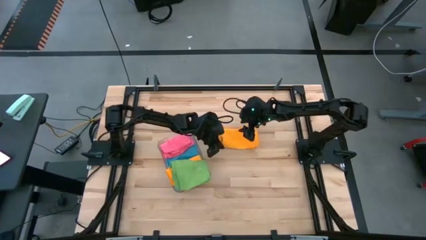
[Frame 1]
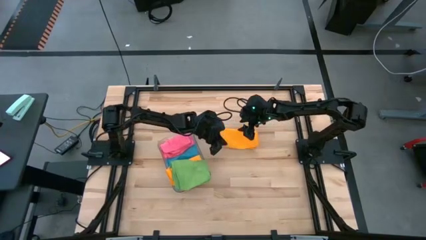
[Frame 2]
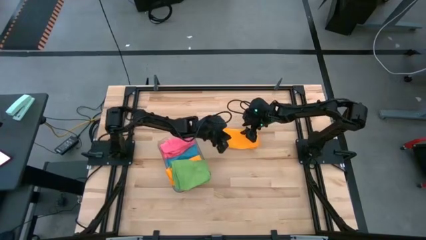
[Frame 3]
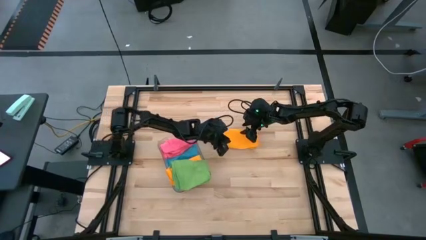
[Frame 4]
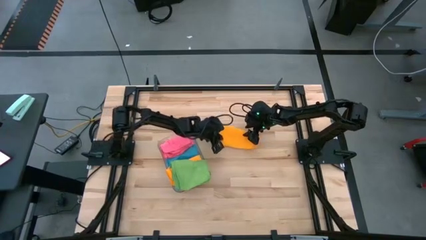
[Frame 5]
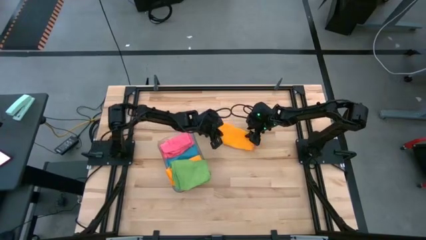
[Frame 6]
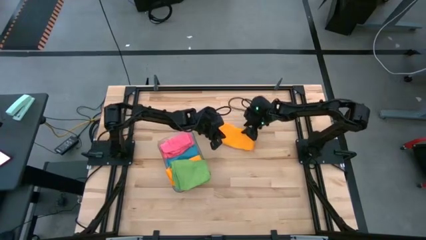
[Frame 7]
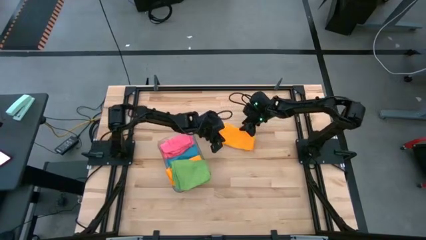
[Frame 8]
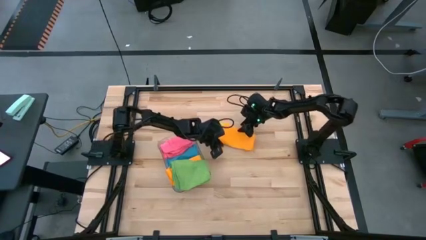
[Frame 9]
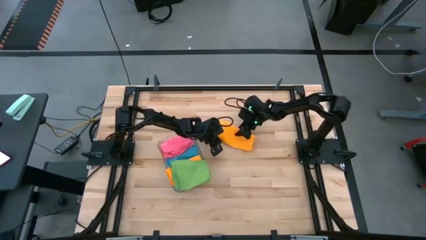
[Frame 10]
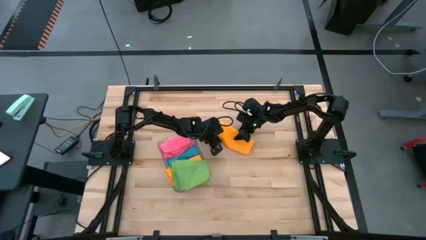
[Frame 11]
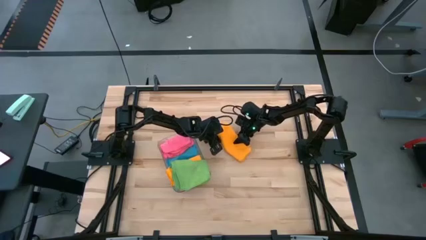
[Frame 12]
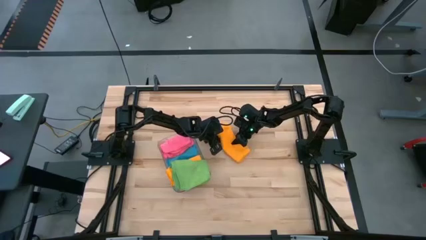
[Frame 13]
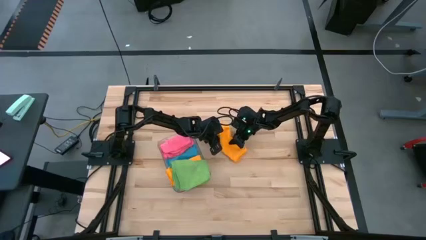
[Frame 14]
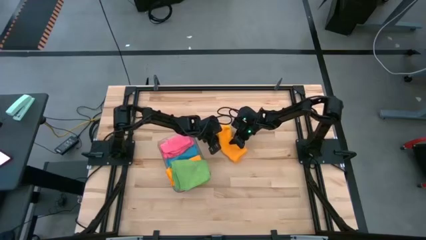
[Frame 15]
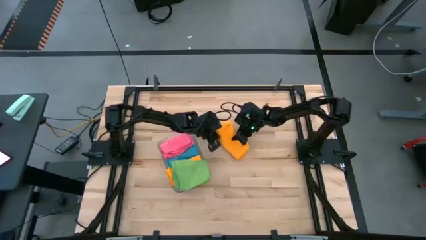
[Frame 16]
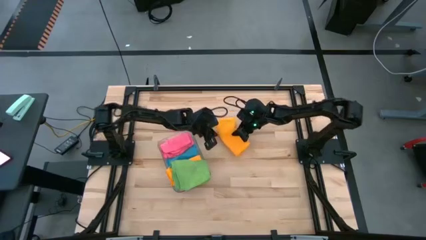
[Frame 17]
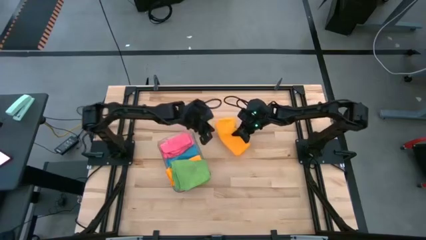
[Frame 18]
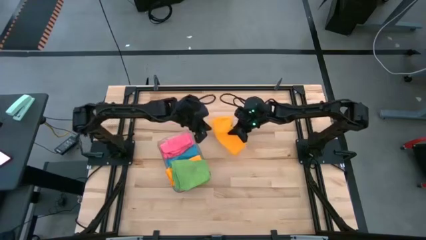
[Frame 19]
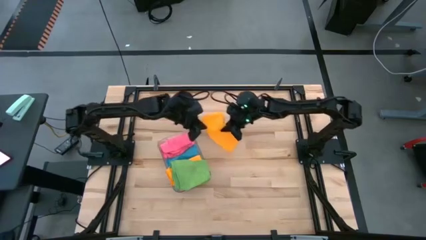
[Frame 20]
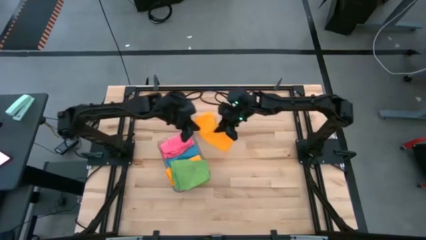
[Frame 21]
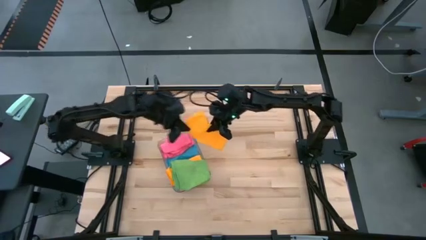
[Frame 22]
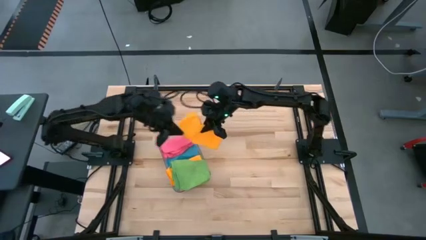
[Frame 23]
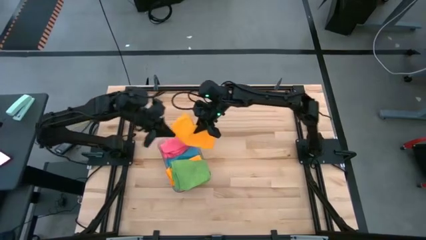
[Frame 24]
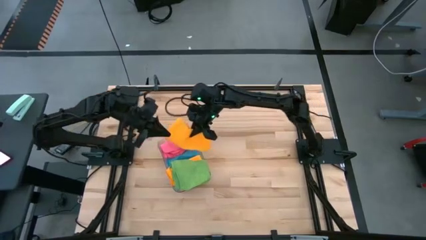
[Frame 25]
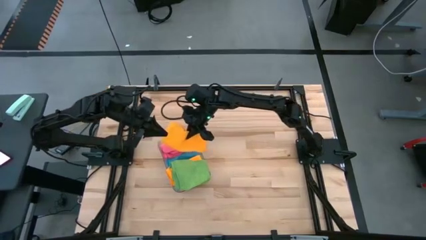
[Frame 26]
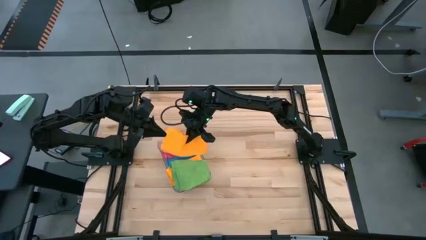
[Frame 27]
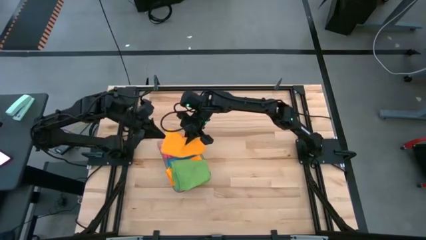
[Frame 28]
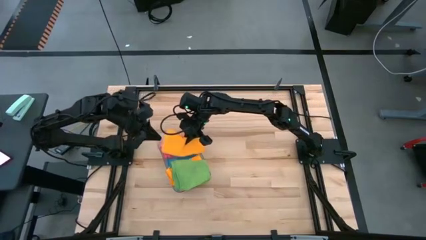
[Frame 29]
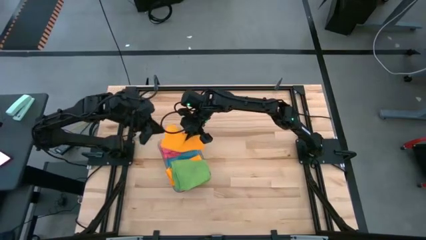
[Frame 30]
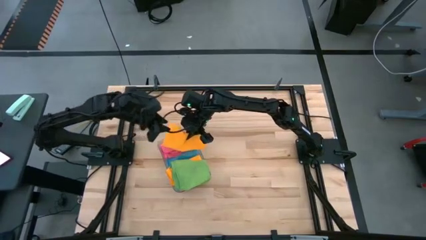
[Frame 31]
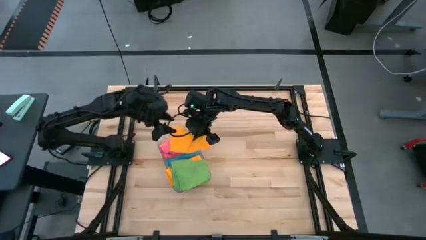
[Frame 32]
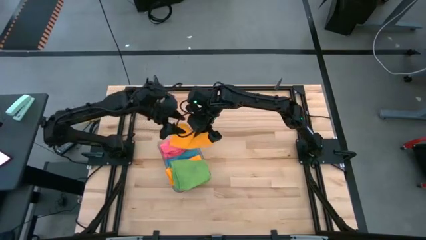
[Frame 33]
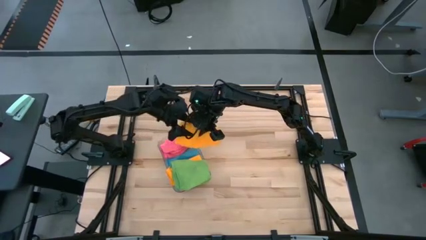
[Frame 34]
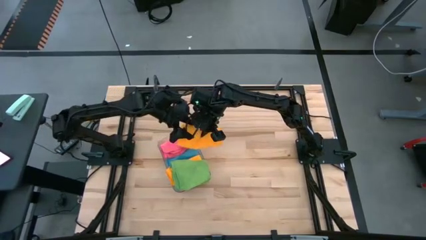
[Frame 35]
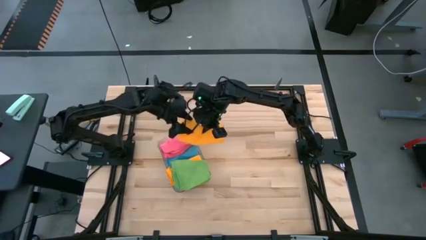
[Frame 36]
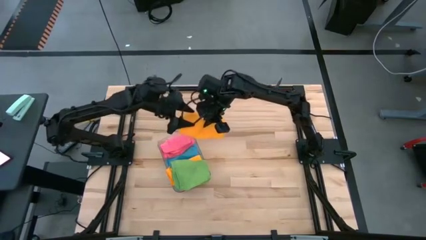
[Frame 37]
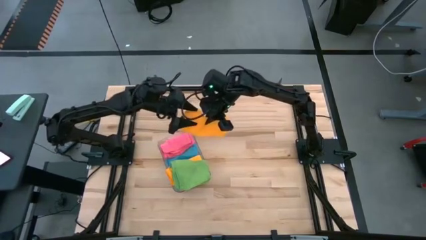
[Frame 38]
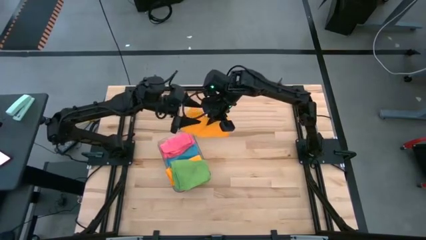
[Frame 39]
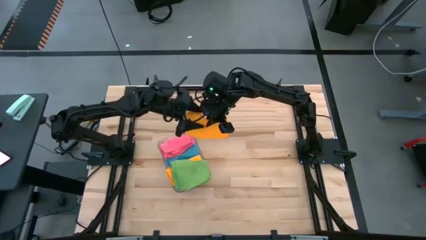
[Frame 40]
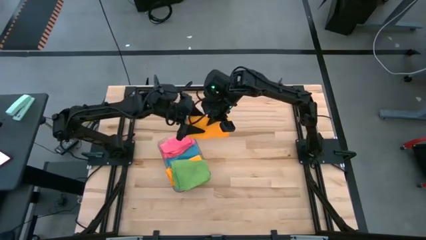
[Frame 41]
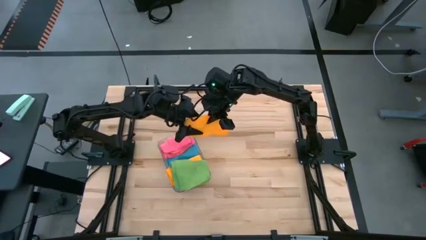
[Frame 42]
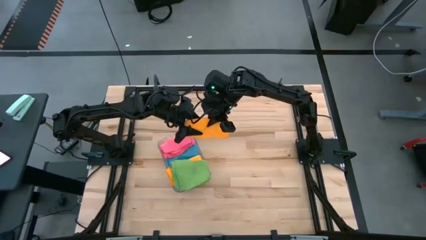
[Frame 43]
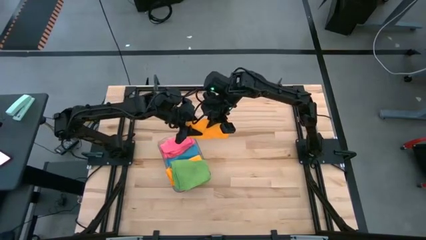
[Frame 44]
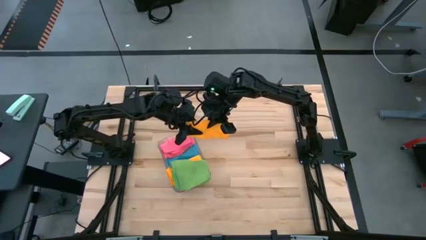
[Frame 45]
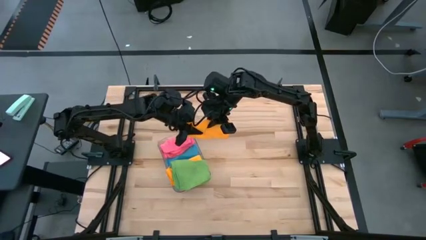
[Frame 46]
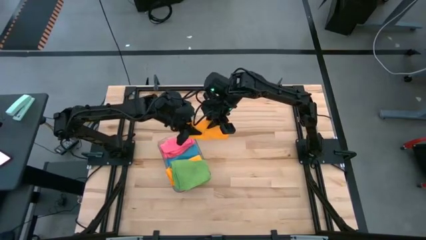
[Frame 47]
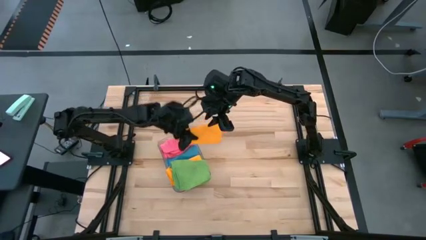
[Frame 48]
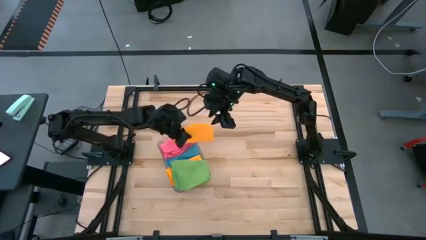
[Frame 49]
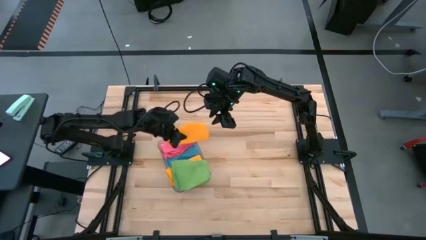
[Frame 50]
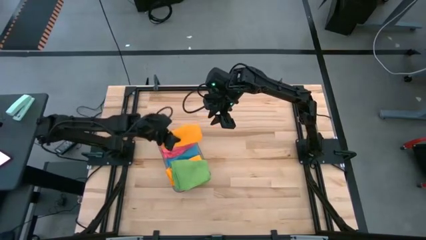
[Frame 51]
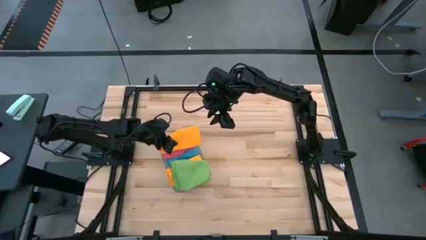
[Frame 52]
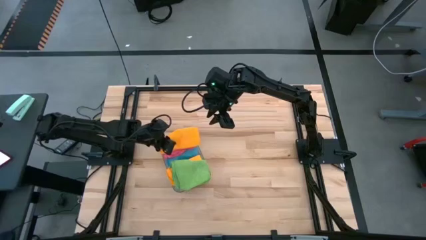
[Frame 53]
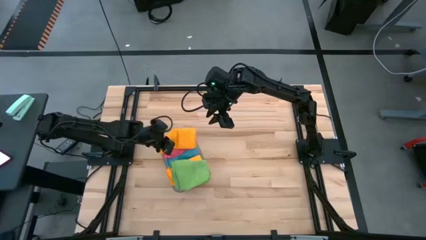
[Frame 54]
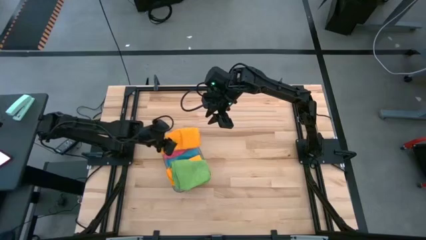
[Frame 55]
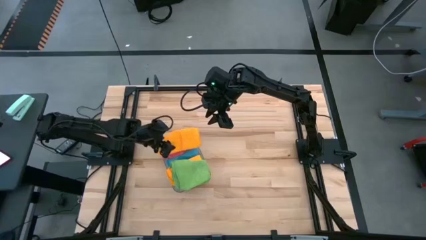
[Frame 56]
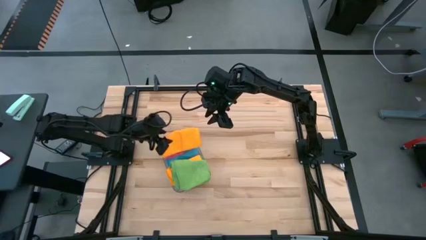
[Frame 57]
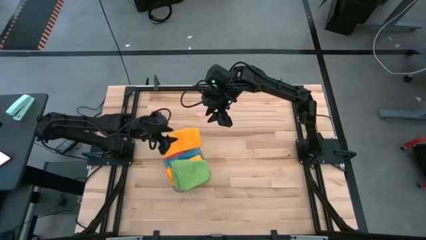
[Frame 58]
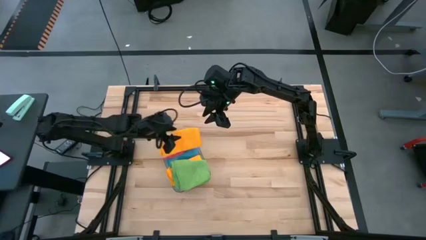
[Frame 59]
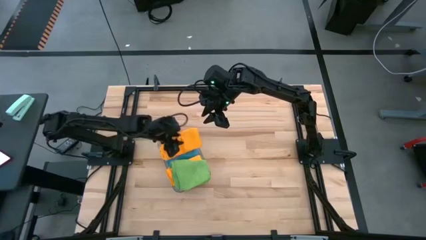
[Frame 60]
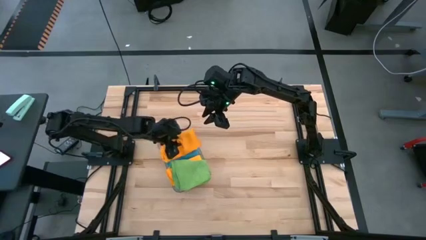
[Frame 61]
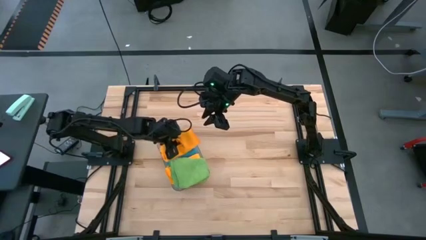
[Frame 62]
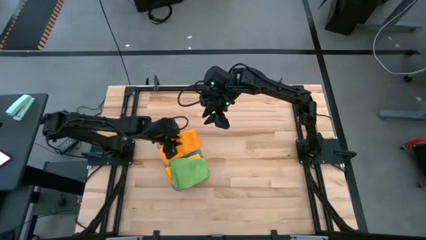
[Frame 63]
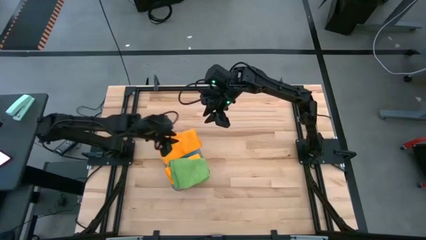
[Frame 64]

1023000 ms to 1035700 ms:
Task: Fold microfiber towels
Put the yellow towel into the transparent bin

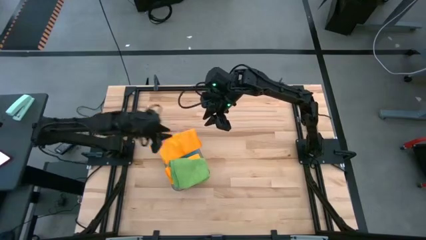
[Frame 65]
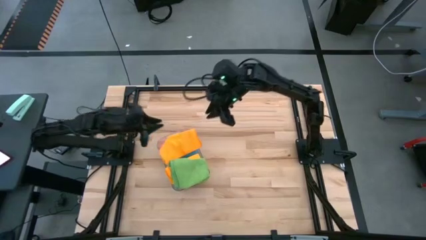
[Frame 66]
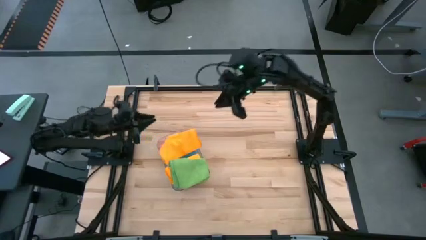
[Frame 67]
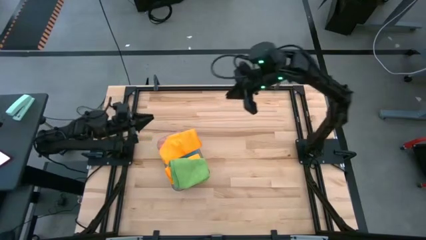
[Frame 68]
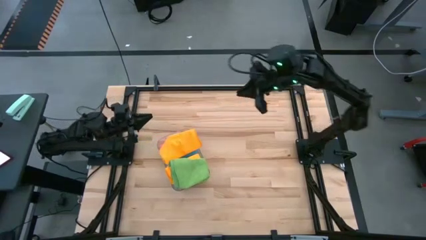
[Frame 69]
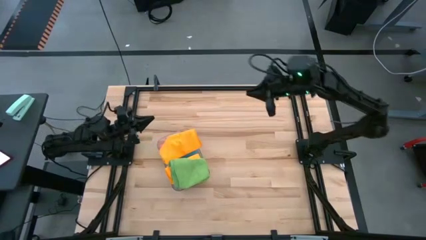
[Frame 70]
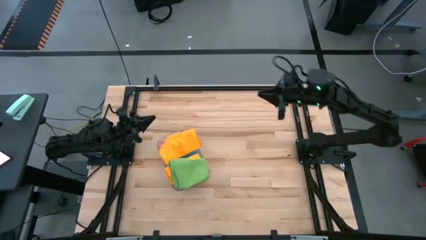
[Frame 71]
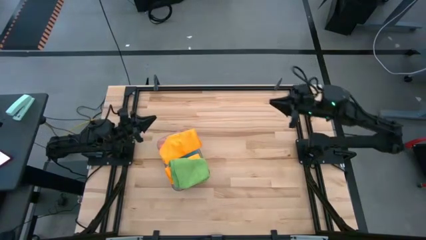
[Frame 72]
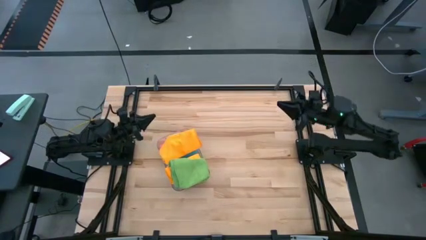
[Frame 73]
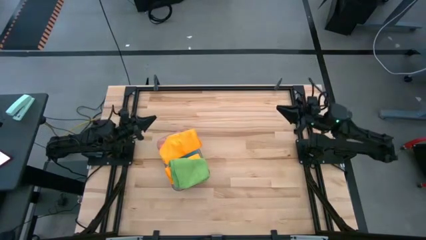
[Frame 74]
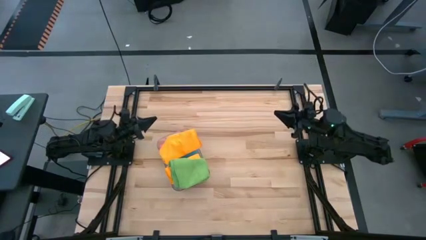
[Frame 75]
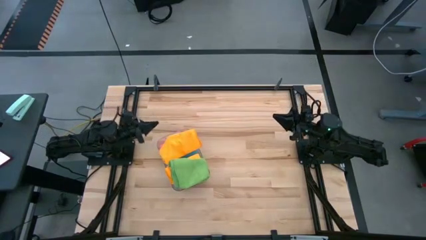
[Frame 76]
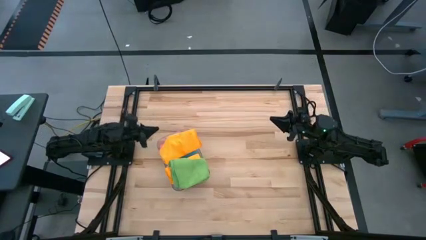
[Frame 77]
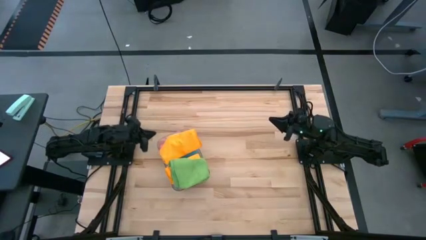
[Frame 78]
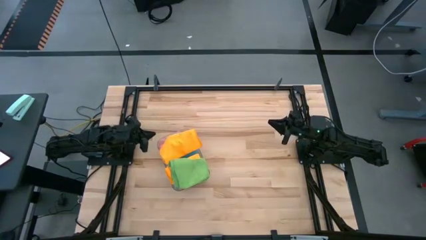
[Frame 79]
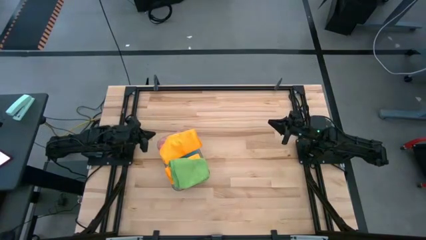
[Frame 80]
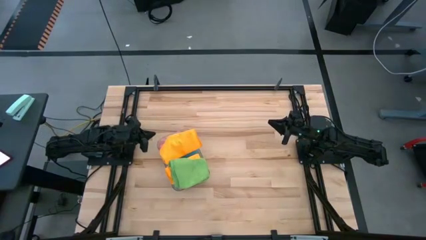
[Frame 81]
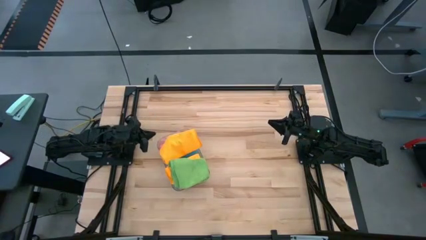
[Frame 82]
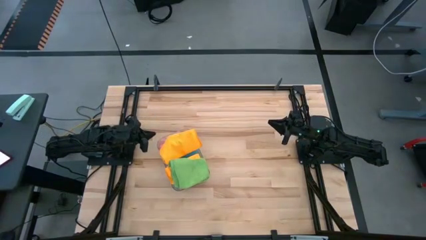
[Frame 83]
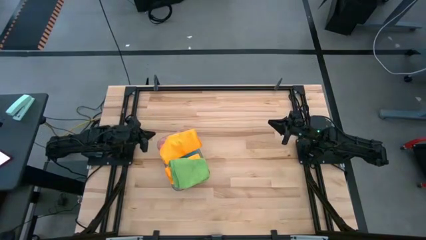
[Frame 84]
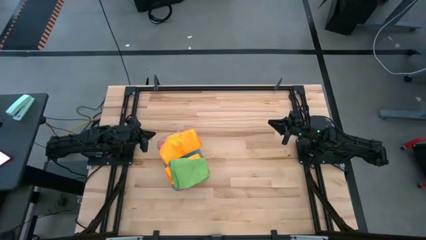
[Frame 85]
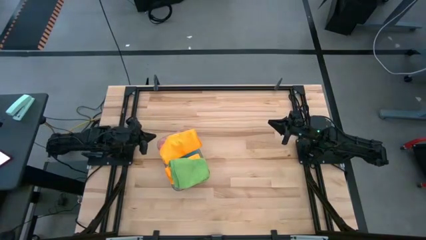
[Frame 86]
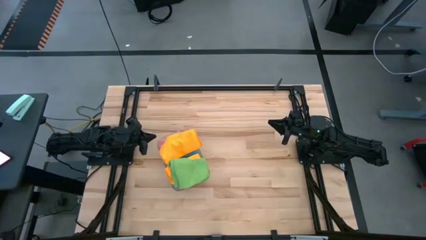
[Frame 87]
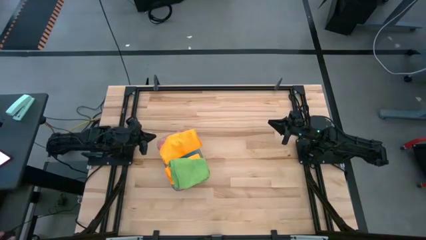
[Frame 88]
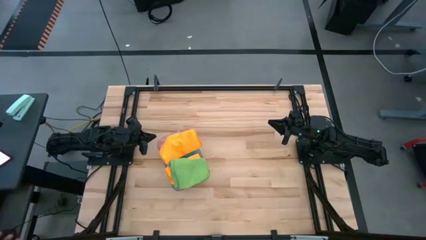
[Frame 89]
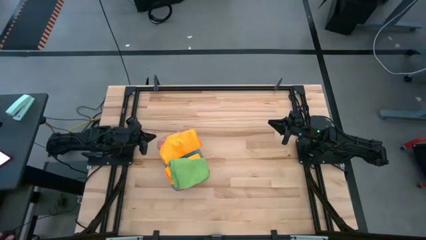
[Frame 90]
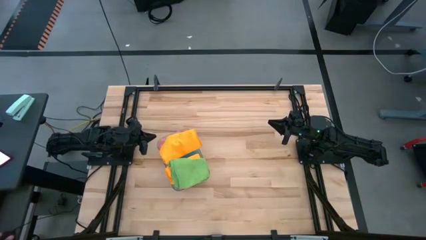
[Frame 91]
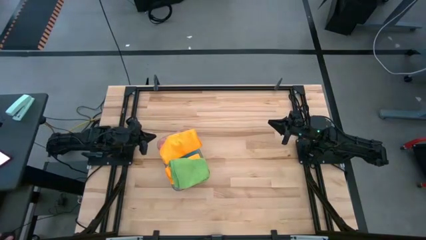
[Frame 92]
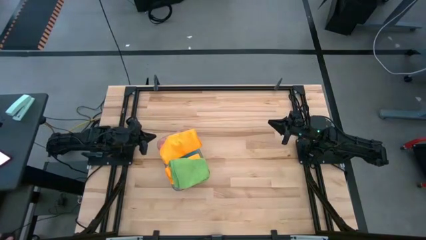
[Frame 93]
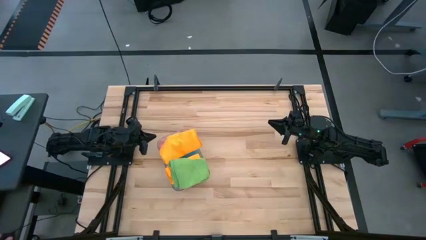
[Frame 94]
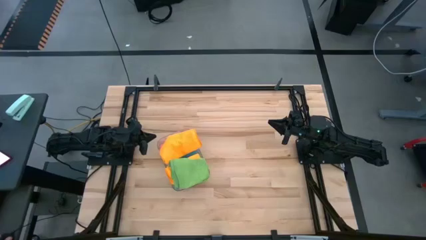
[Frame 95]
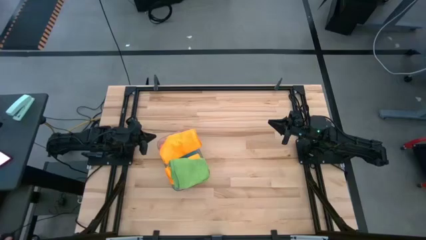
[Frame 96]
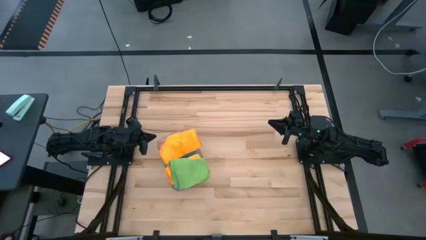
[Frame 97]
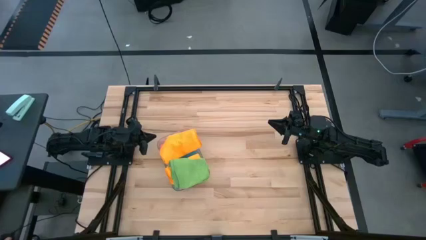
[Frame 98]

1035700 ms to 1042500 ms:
Return to Home Position
